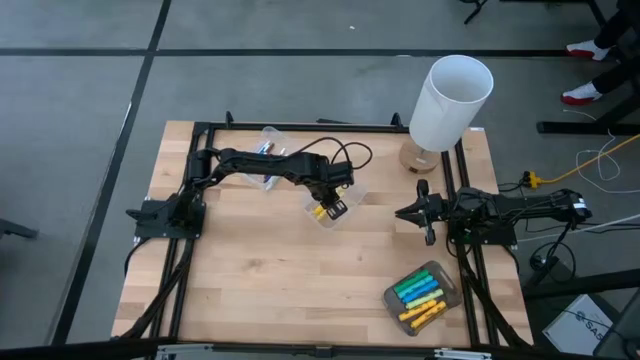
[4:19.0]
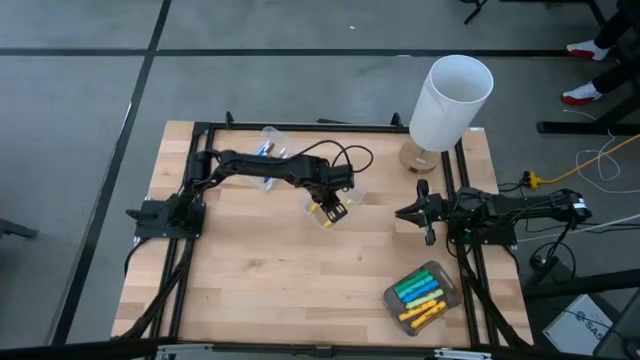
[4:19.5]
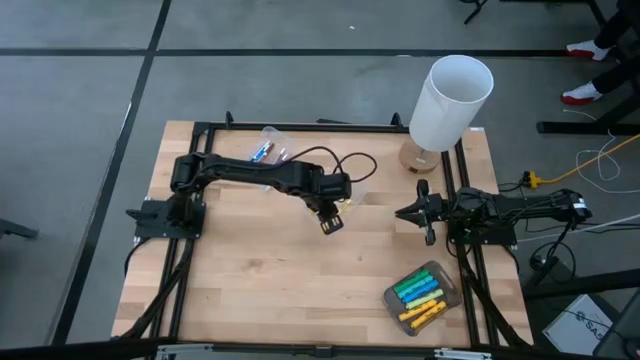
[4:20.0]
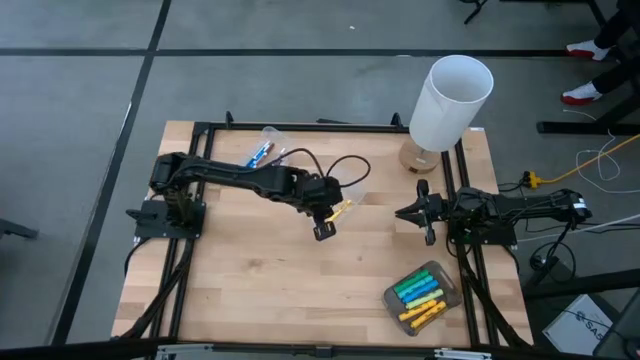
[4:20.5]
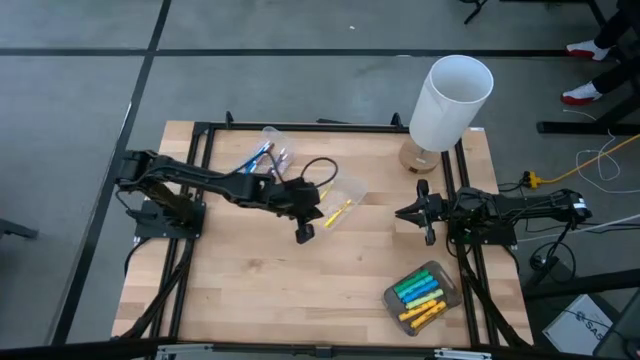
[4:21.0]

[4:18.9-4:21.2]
Task: Pick & Place Markers
Return to Home Position

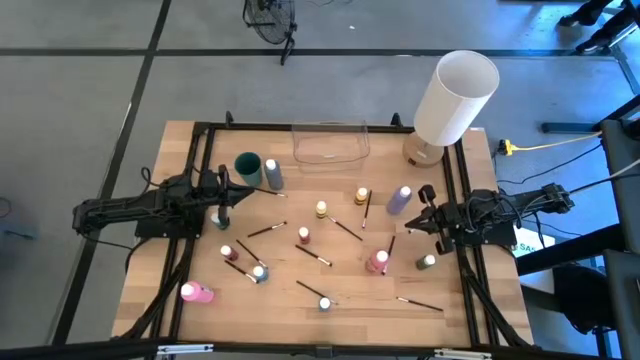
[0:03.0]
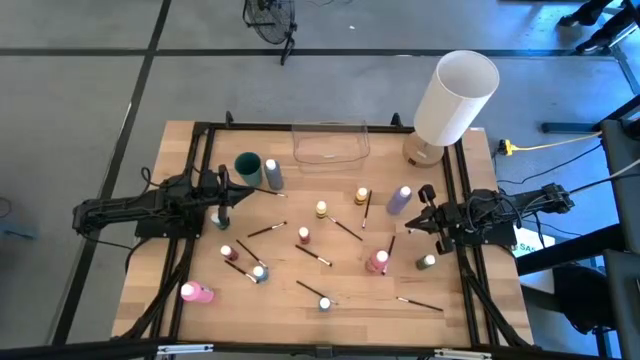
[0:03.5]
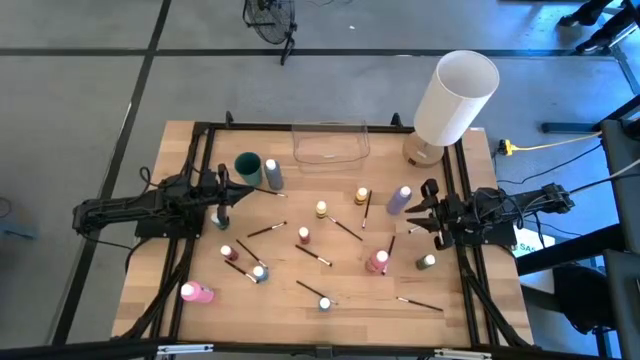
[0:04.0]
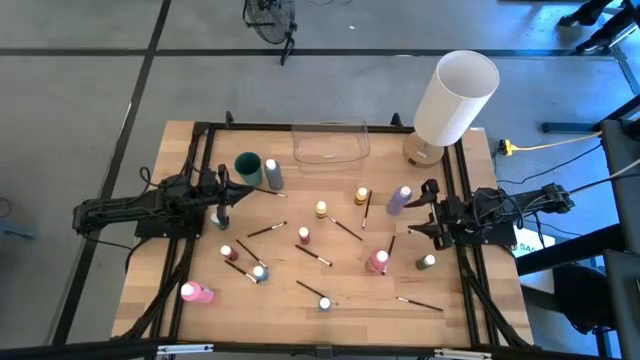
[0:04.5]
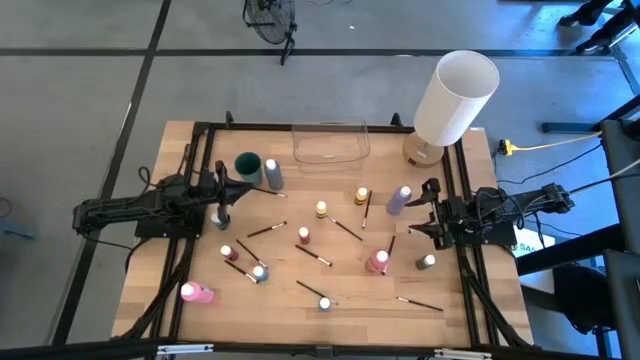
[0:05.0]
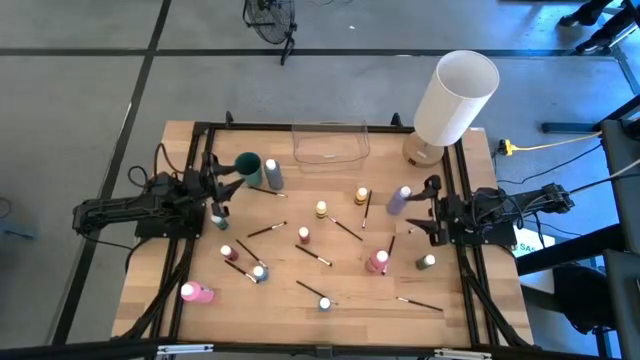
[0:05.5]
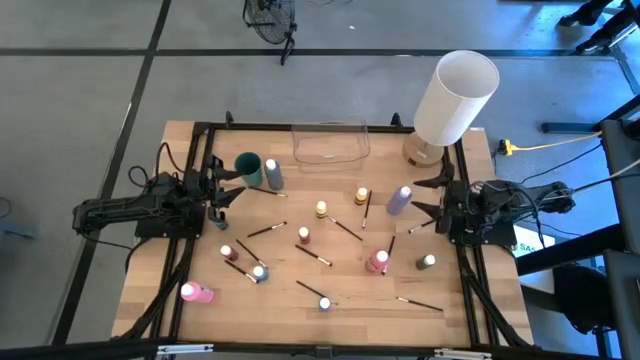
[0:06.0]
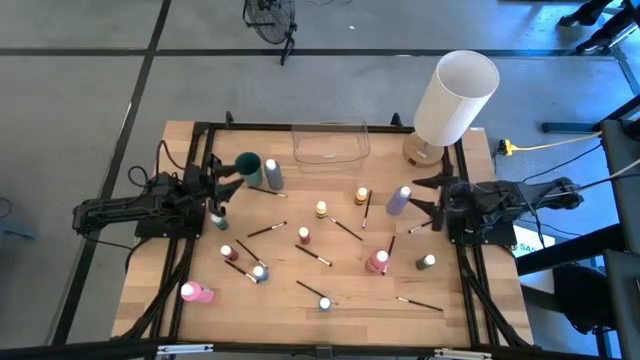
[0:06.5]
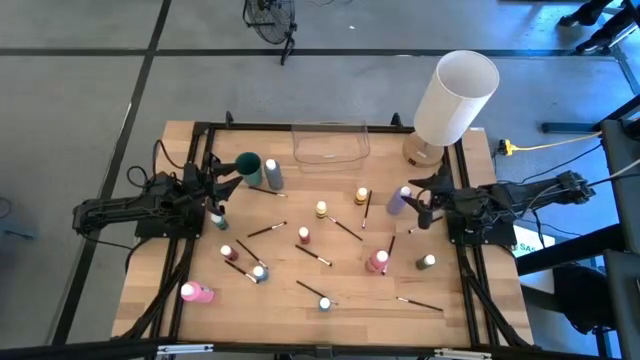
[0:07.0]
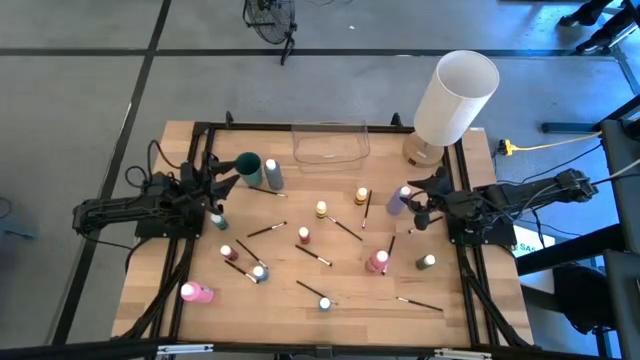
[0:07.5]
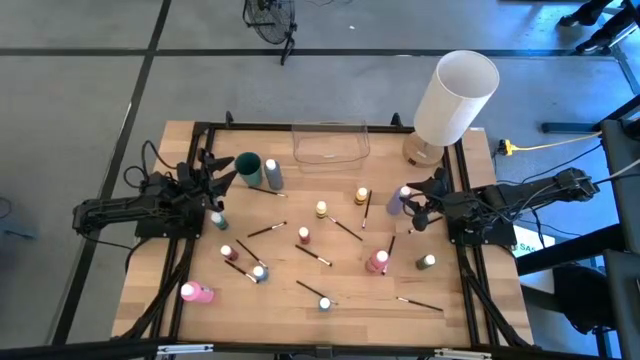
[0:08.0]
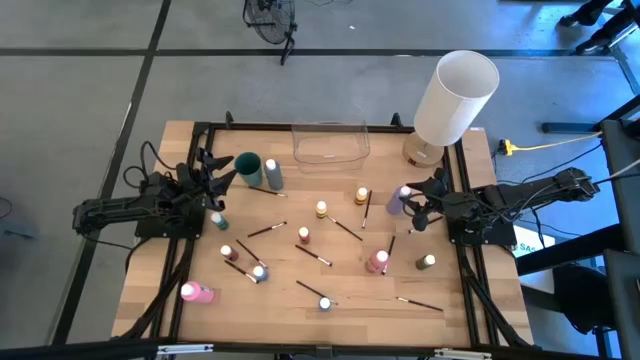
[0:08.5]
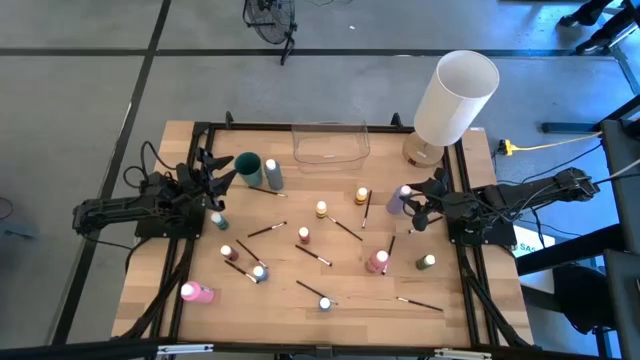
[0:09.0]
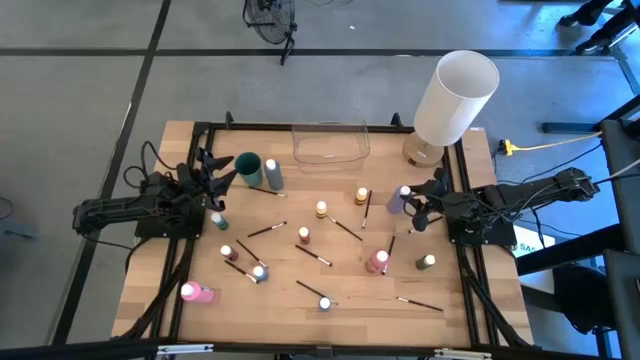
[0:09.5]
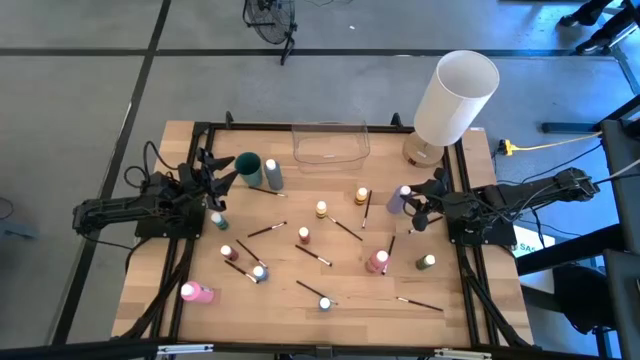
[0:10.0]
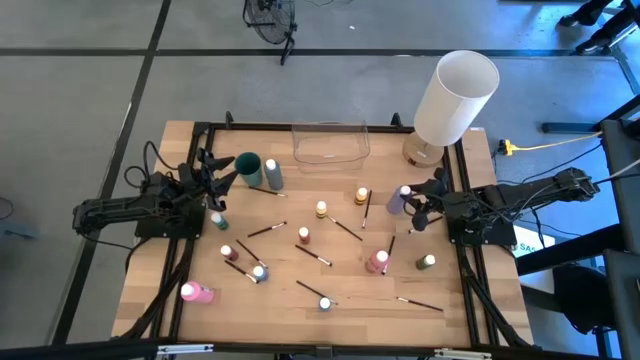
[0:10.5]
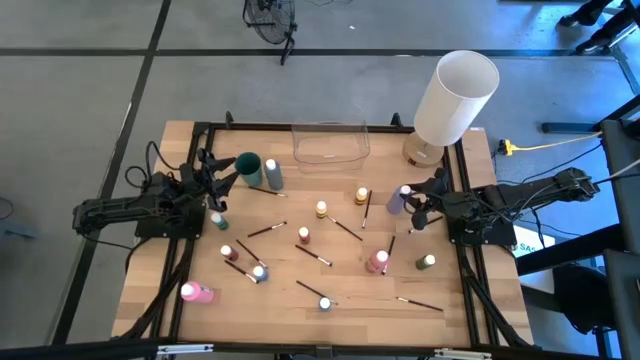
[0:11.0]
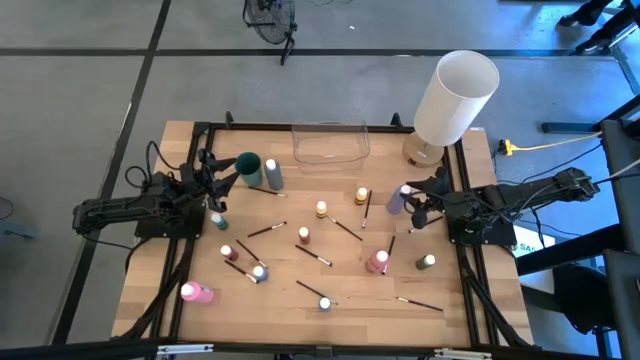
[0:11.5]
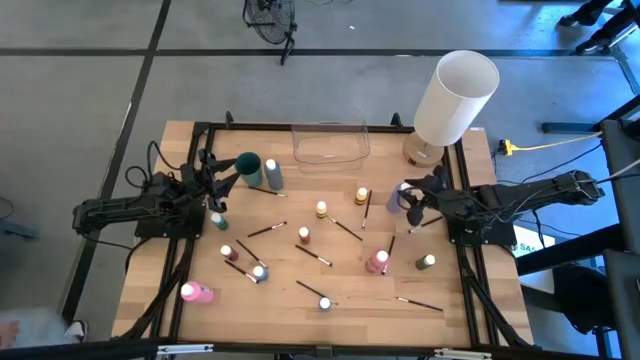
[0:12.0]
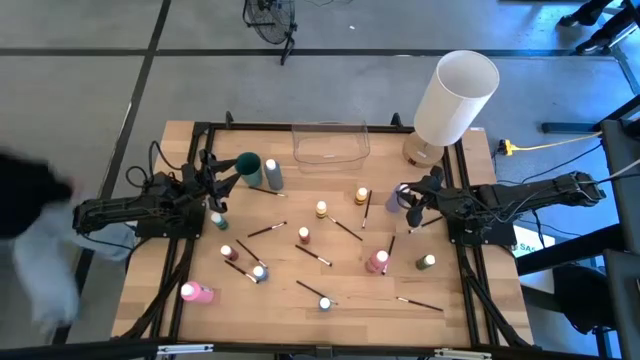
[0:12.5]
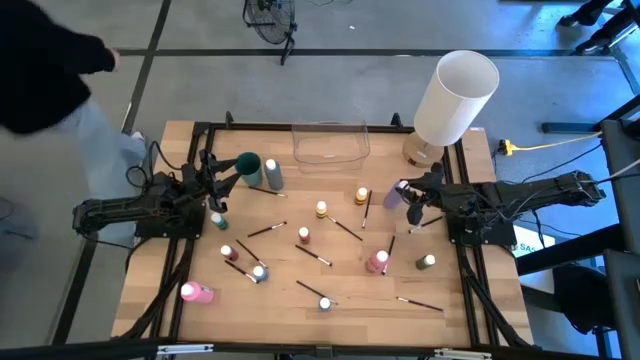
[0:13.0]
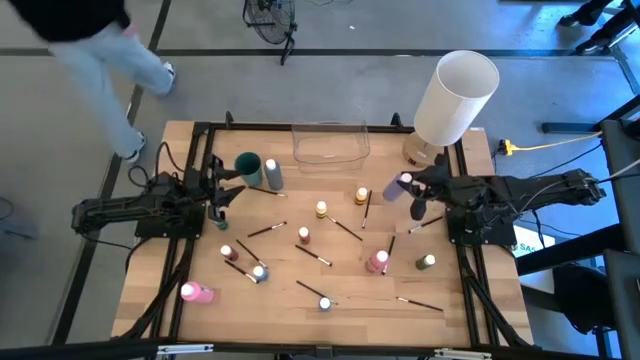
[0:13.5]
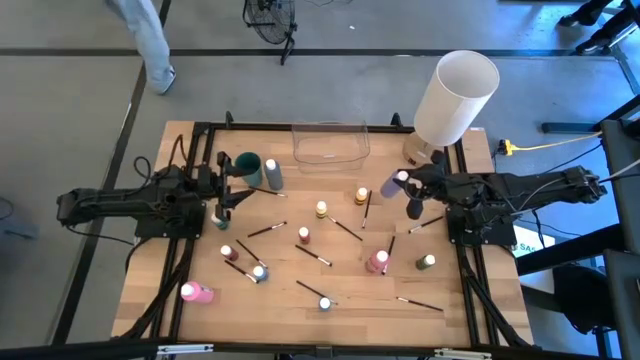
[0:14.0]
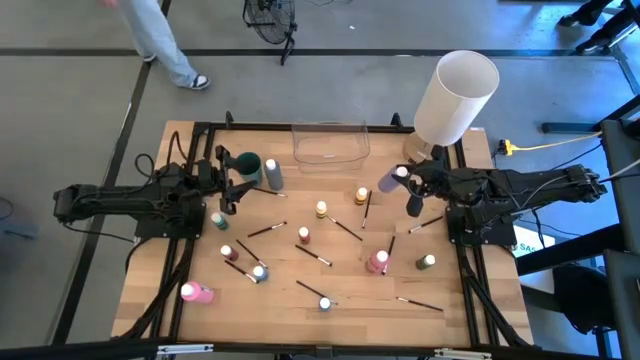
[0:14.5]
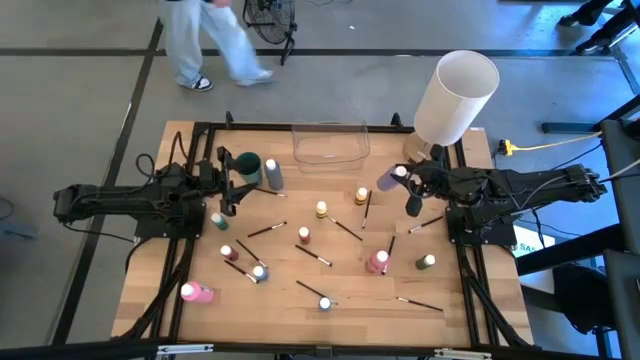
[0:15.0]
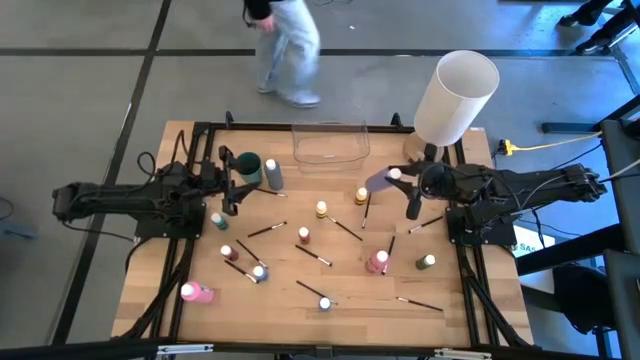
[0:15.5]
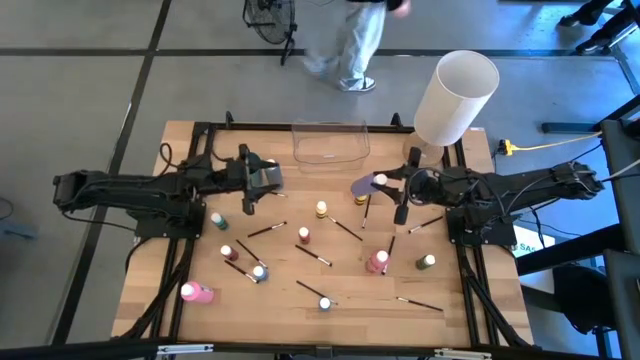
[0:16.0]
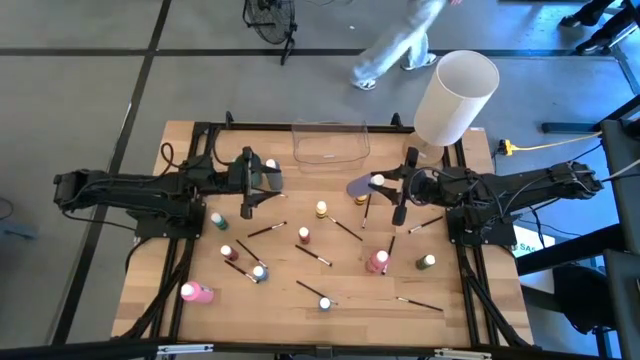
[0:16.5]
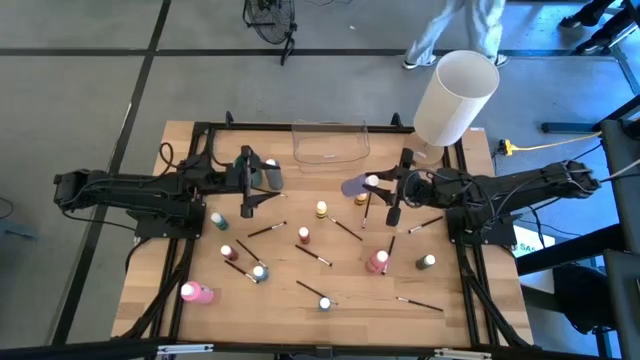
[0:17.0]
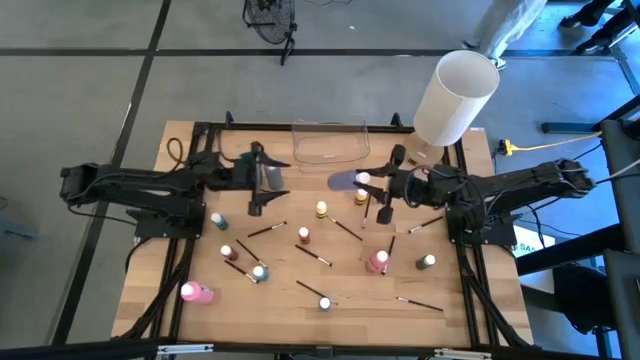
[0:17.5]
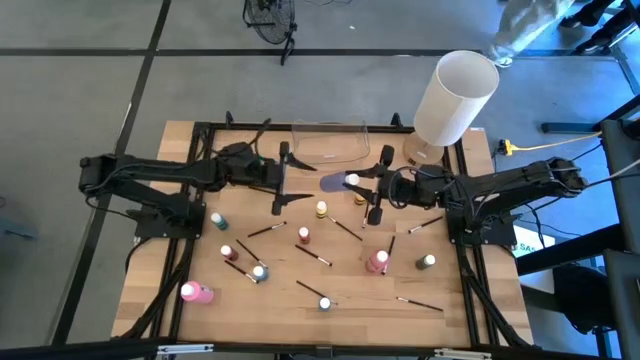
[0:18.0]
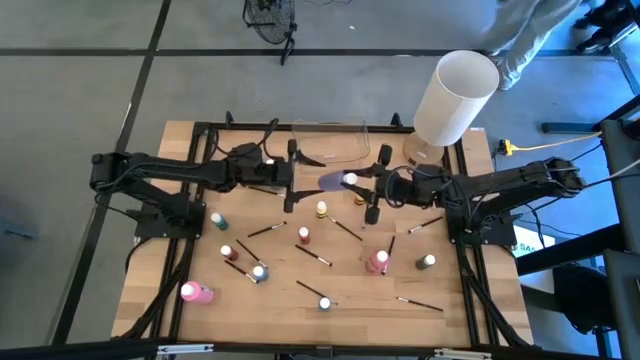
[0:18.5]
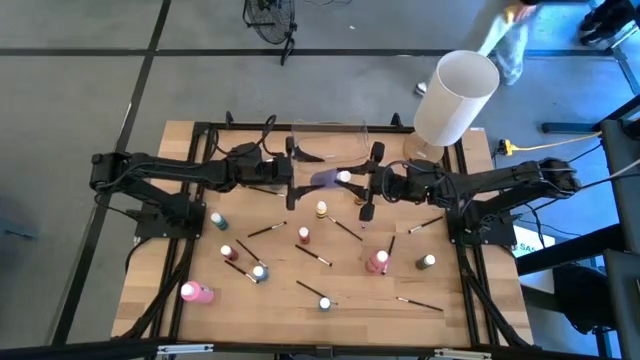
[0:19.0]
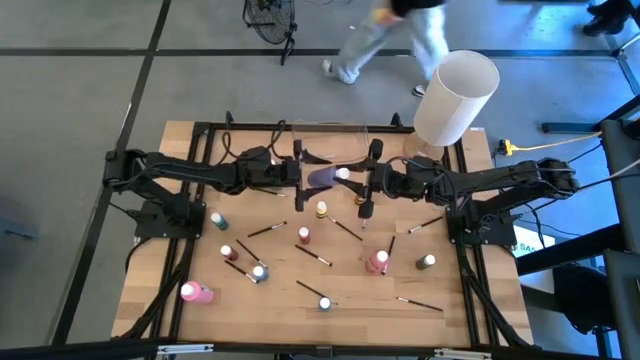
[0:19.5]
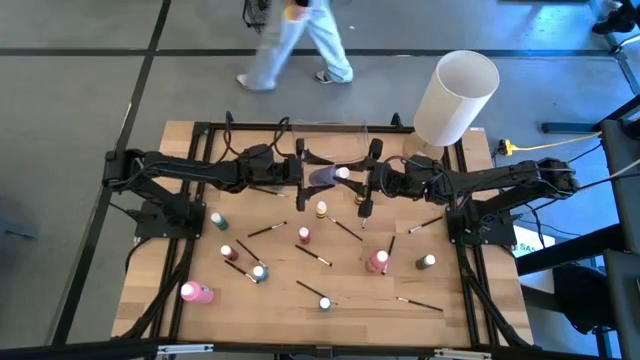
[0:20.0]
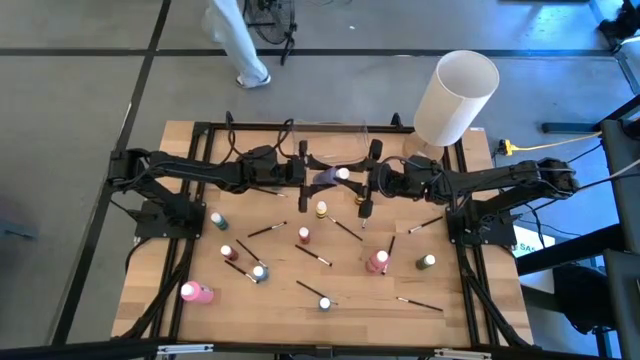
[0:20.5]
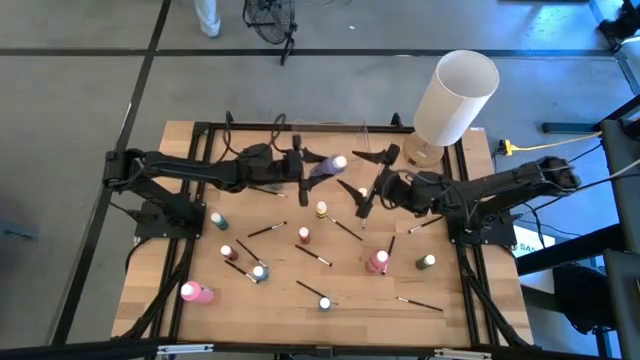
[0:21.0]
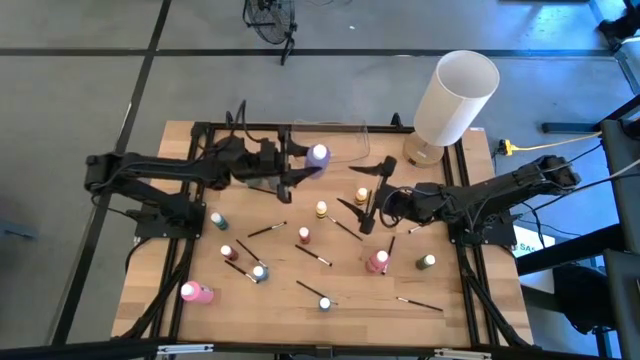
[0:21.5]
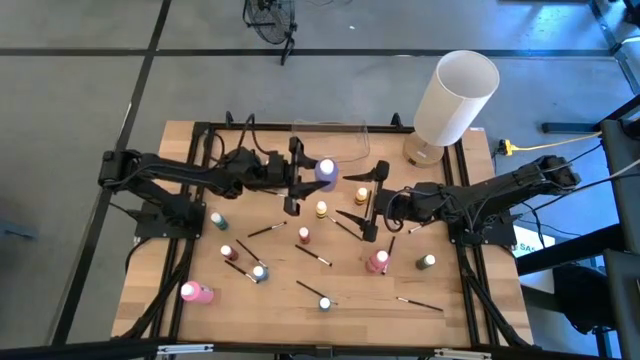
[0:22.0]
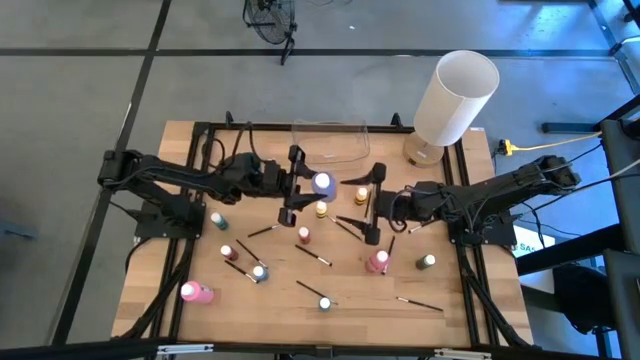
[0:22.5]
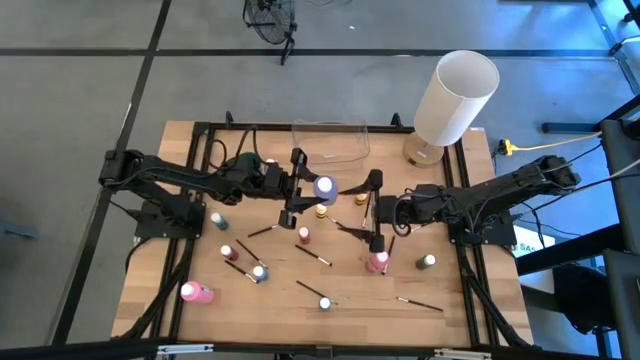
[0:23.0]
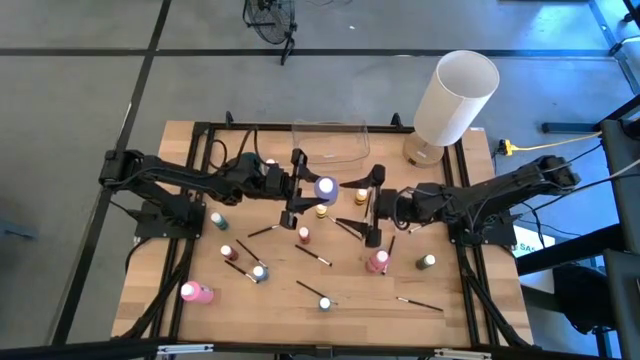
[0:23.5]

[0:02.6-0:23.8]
Task: Pick & Place Paint Supplies
Put the violet bottle into the transparent bin
